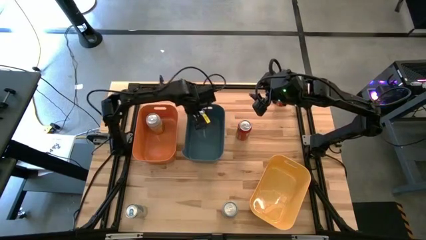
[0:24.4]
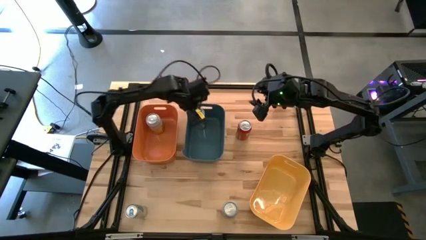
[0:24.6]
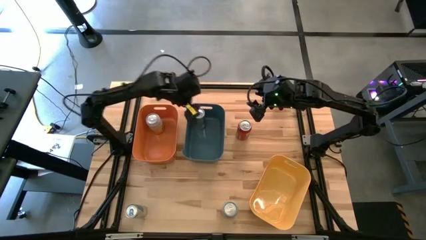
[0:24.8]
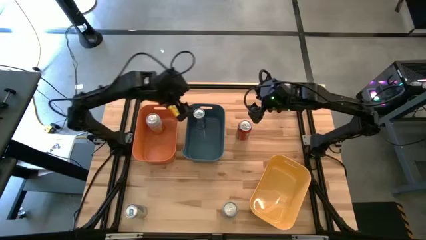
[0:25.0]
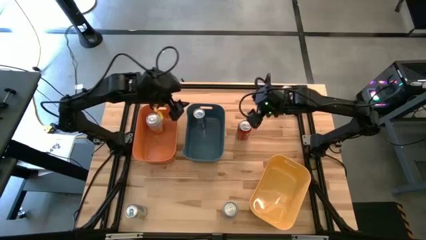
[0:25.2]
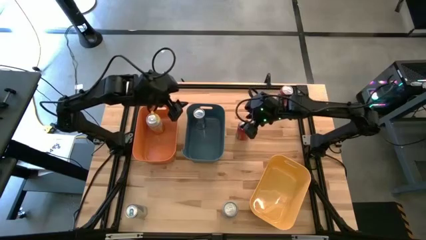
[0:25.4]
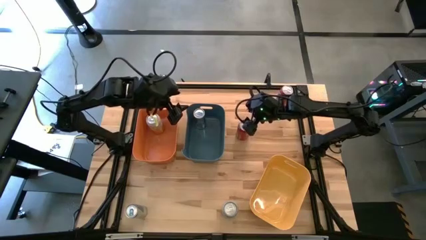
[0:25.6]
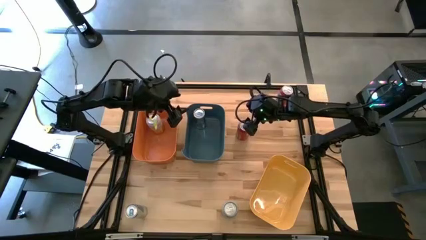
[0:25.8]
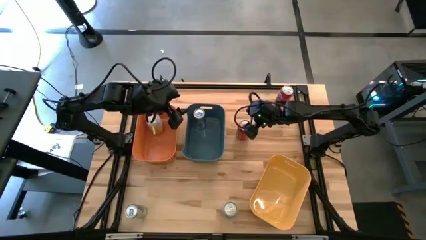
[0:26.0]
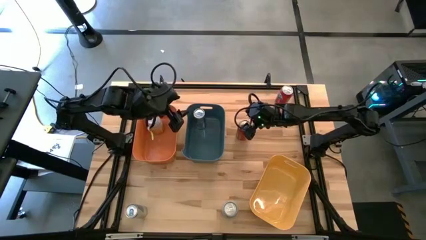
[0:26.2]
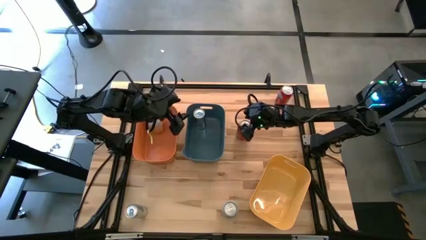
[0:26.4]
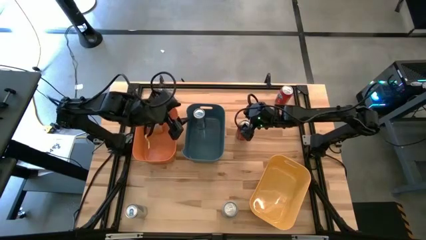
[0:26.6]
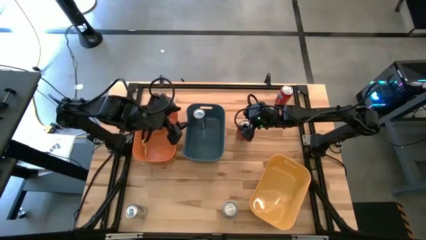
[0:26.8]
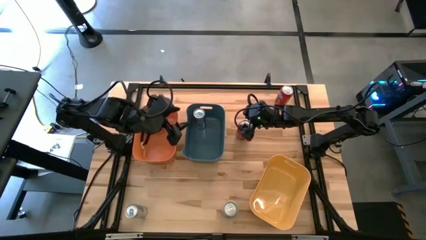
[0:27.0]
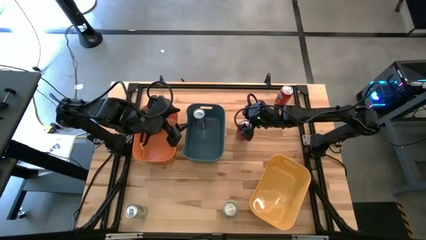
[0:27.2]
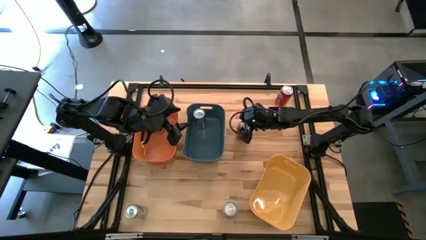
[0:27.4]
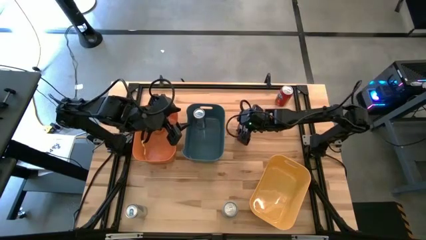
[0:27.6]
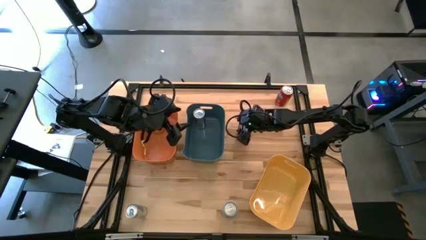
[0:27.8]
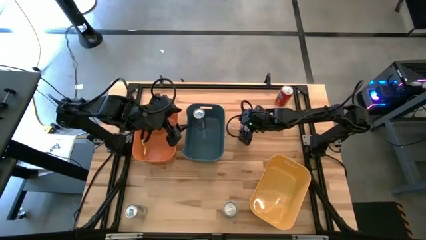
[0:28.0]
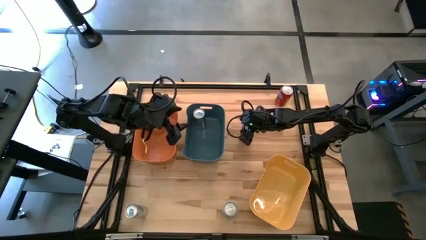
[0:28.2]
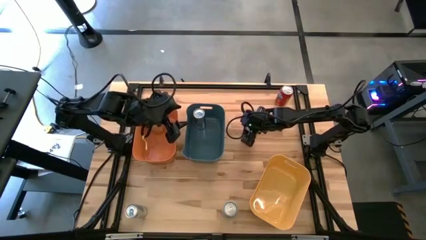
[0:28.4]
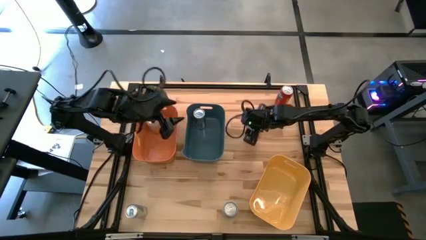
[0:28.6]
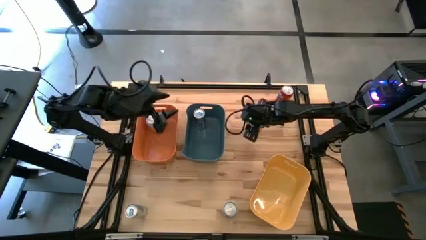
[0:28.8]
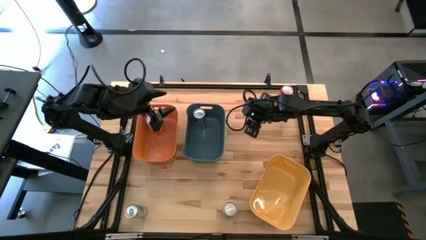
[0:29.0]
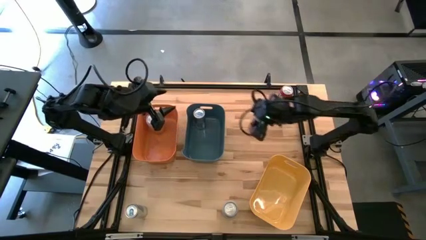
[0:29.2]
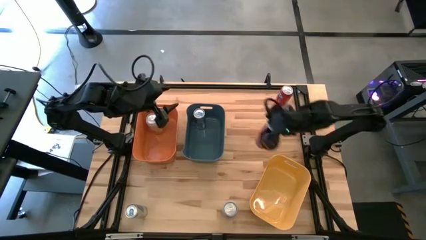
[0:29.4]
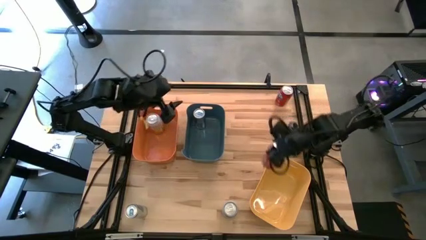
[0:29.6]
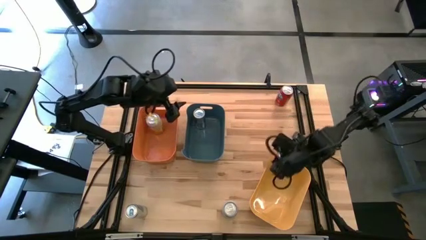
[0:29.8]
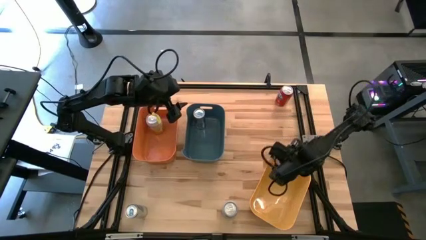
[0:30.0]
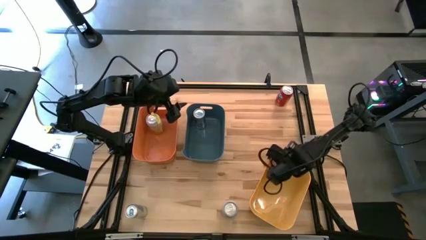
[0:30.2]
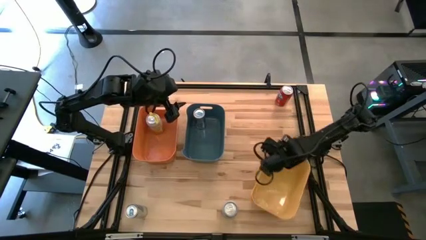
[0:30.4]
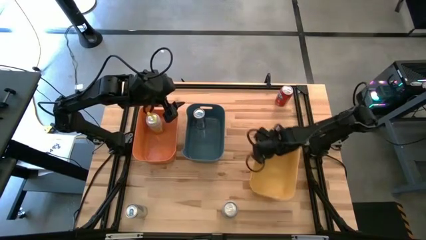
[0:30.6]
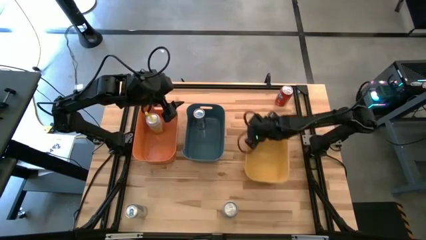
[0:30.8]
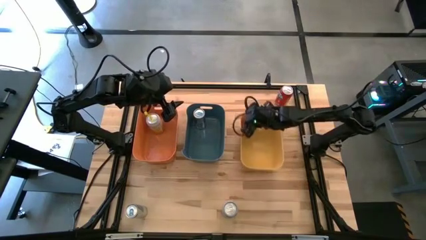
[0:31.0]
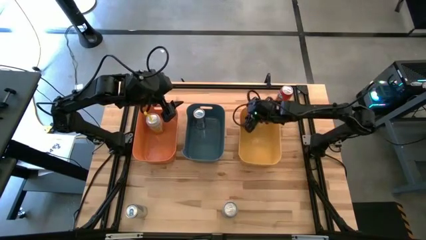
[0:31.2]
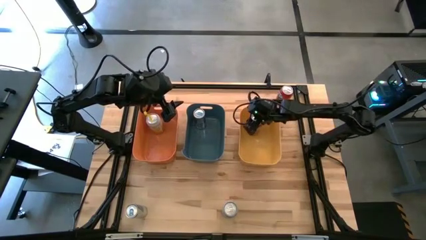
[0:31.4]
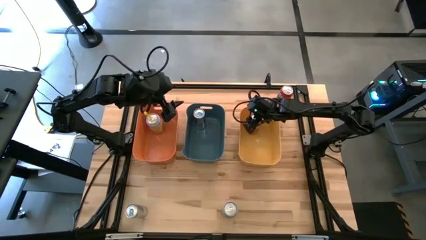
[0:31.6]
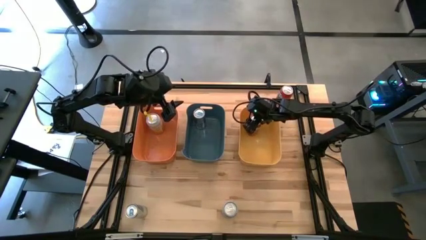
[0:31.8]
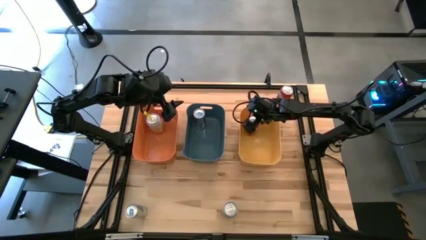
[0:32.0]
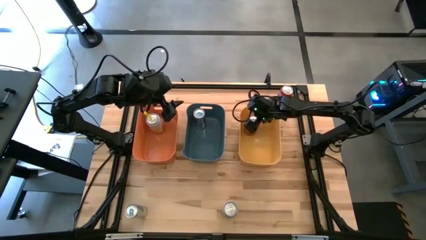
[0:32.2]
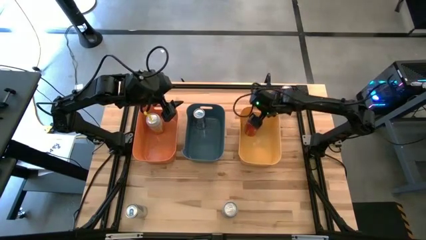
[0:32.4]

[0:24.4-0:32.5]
Task: Sort soda cans
Put the left red soda can into the yellow bin

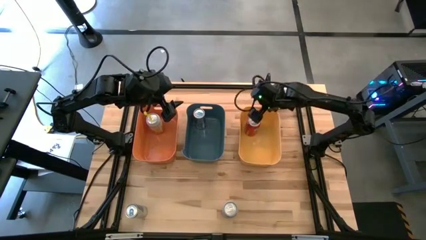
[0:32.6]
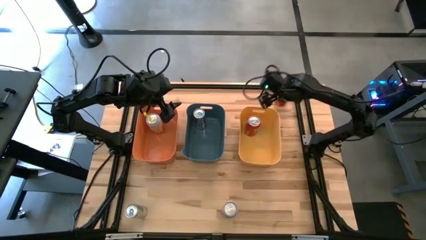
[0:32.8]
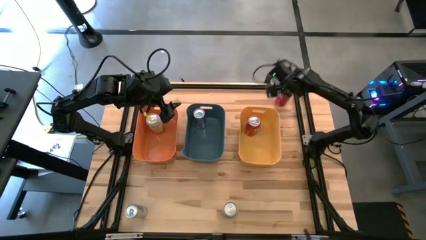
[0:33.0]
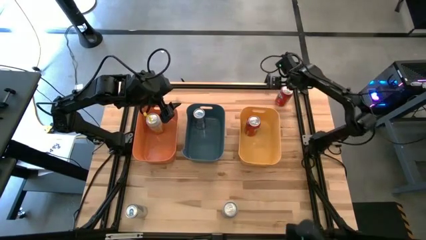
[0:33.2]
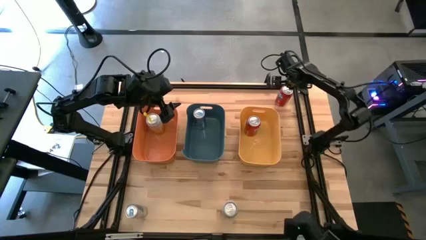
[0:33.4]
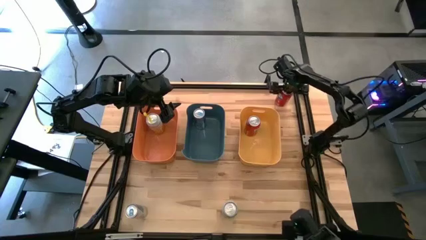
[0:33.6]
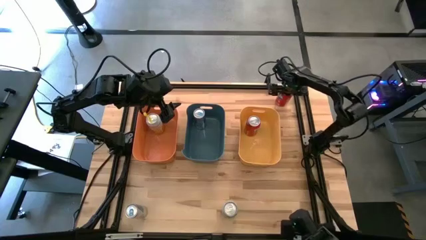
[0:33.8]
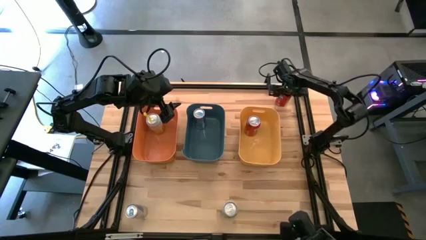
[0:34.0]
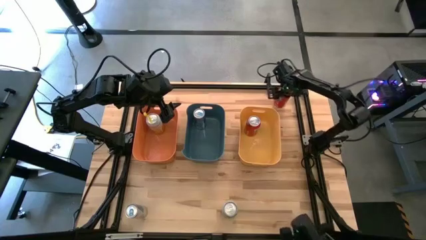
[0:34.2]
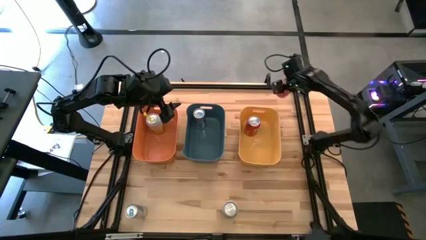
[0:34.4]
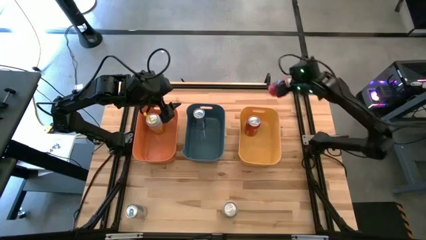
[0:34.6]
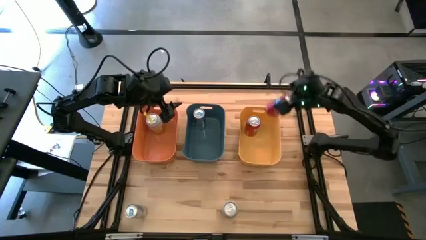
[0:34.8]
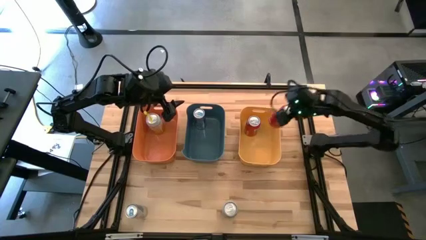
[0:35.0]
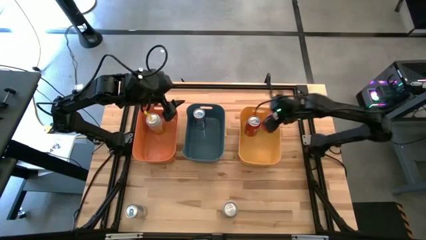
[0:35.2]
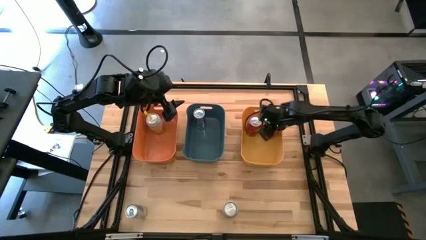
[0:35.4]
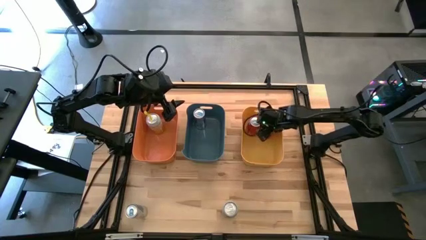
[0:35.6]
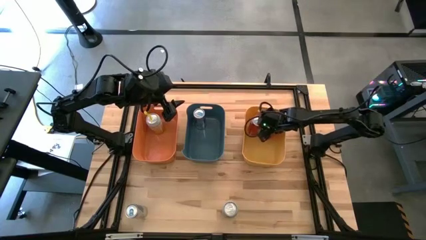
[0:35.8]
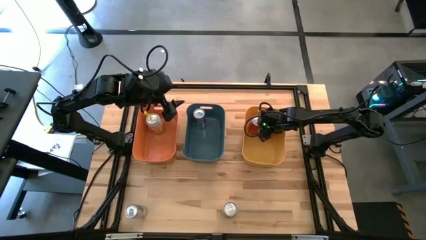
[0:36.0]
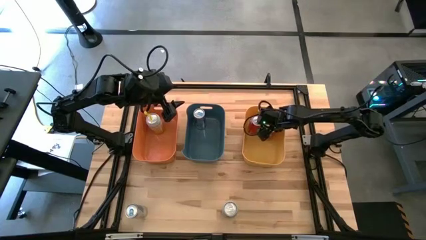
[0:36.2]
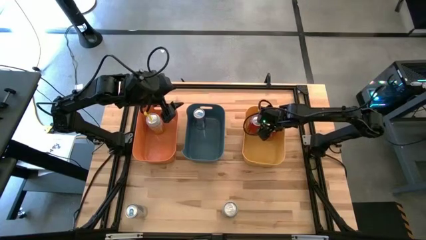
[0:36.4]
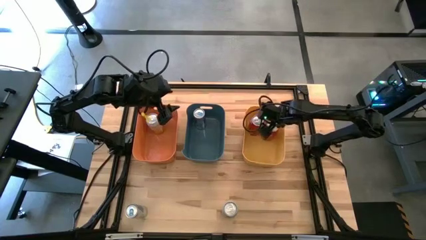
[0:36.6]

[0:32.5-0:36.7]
Put the red soda can into the yellow bin

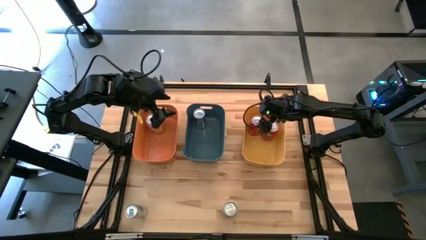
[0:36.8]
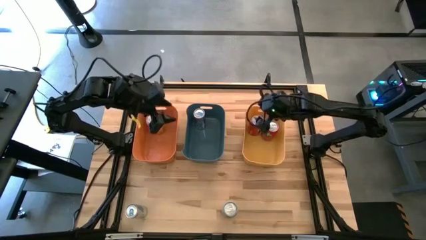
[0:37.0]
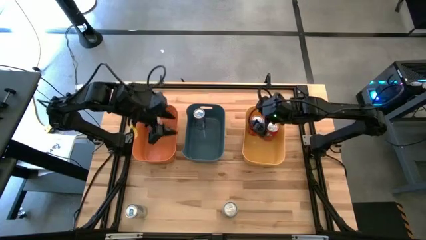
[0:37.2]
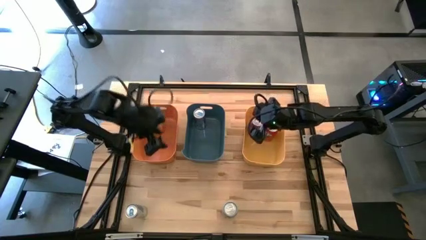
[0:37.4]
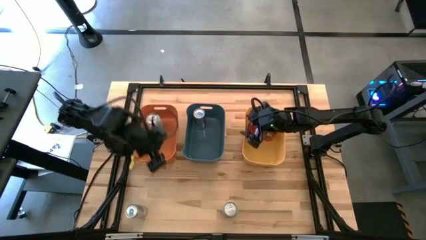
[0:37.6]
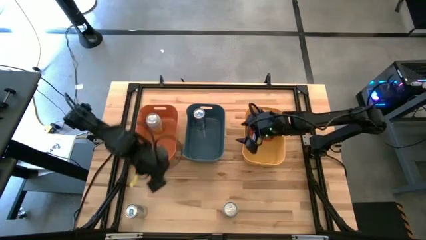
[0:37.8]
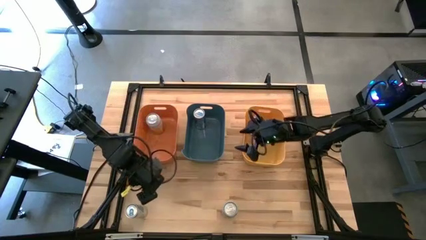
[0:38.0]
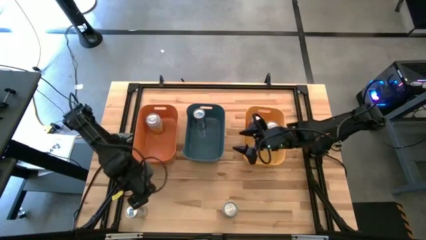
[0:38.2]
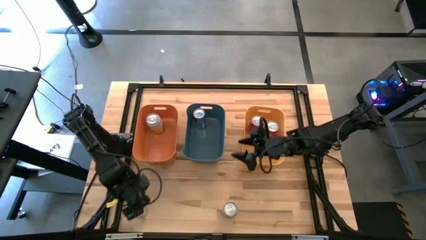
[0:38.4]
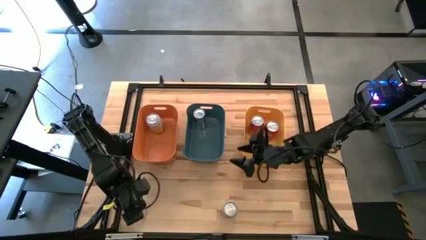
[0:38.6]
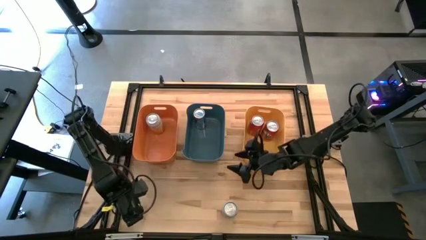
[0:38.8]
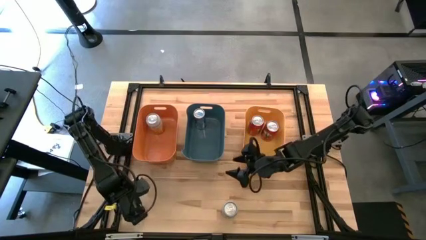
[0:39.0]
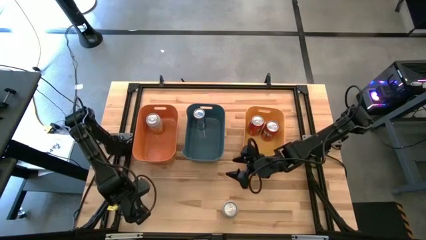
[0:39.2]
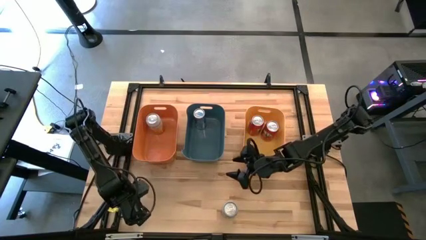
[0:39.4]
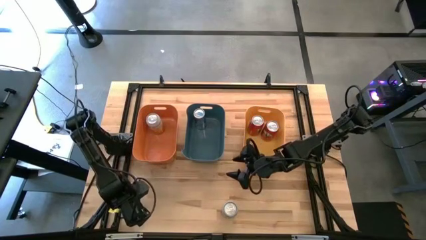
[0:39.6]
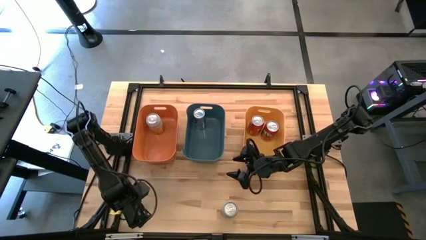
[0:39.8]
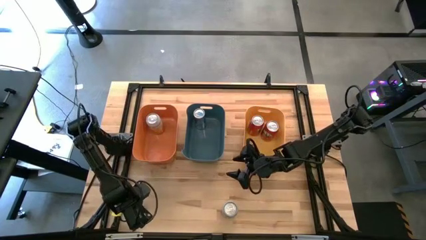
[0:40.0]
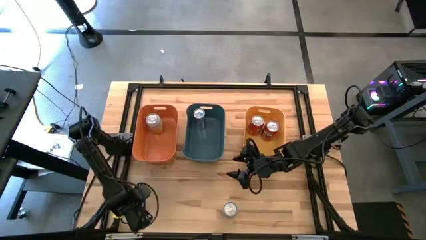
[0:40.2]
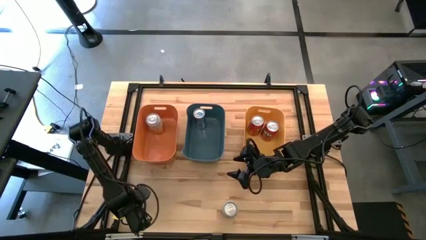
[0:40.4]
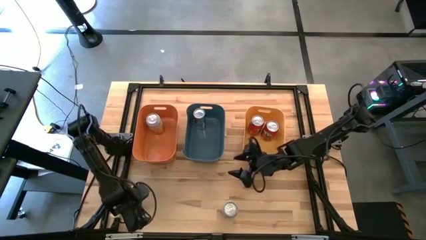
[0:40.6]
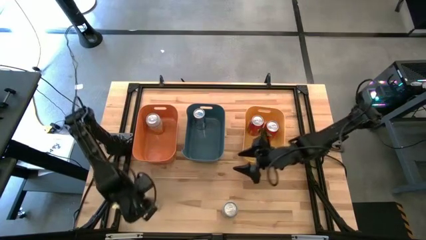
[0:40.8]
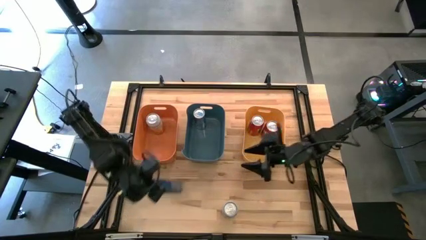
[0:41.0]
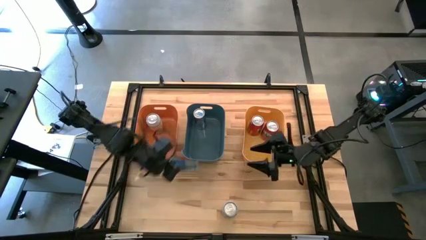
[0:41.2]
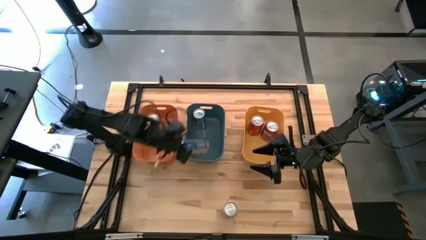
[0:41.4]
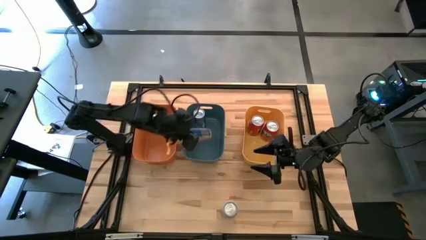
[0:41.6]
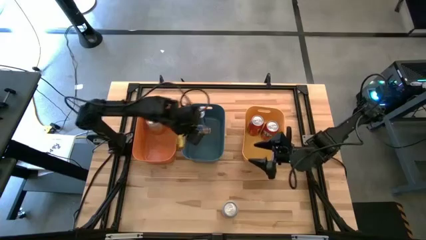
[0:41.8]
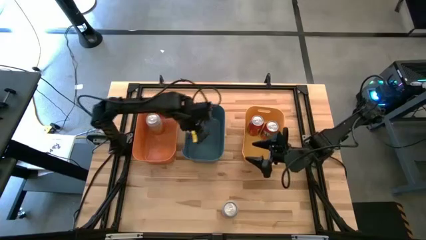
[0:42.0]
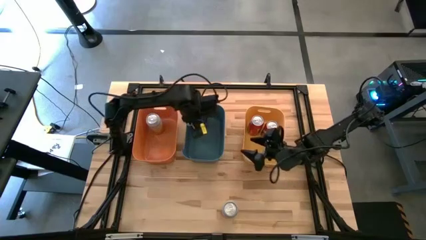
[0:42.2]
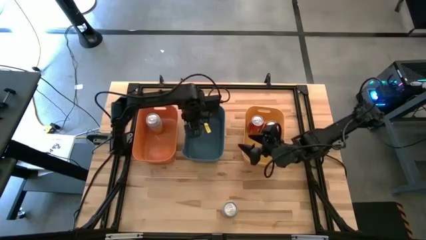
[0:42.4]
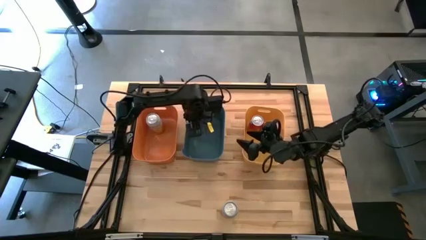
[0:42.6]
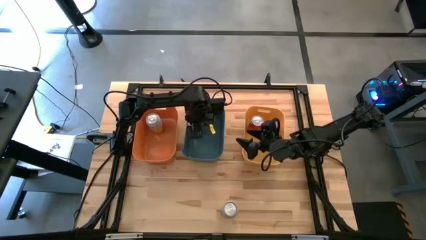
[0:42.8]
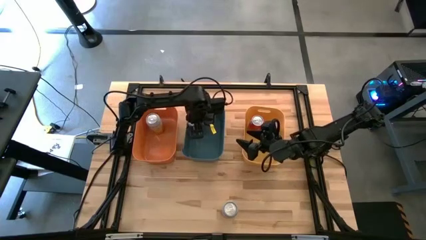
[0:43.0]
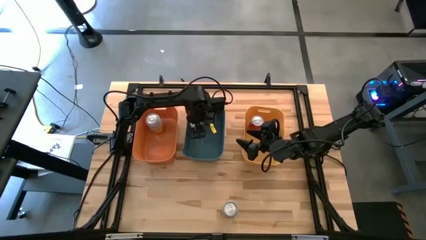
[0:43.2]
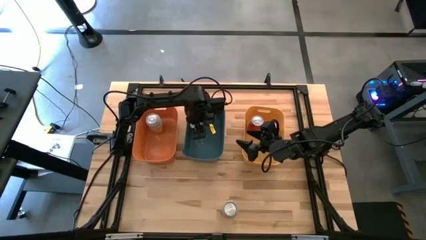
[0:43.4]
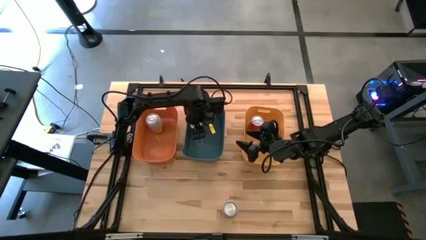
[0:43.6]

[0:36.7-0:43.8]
Put the blue soda can into the blue bin
